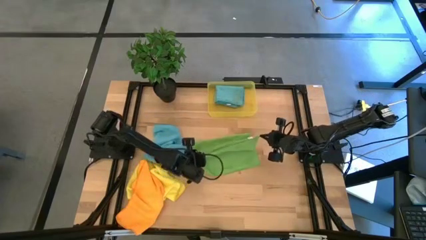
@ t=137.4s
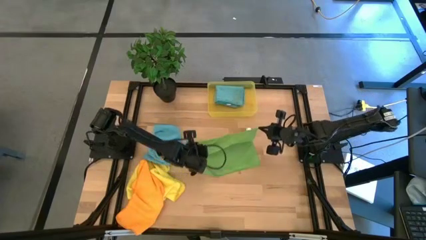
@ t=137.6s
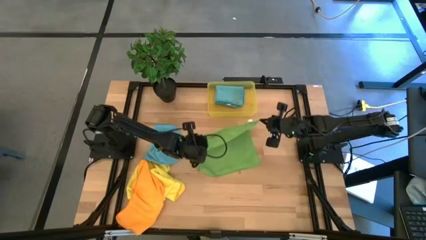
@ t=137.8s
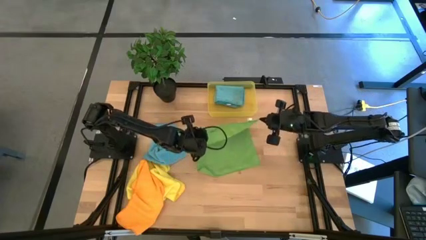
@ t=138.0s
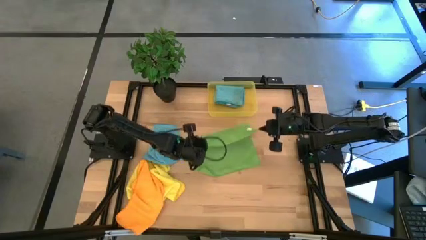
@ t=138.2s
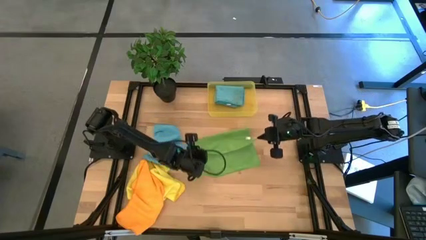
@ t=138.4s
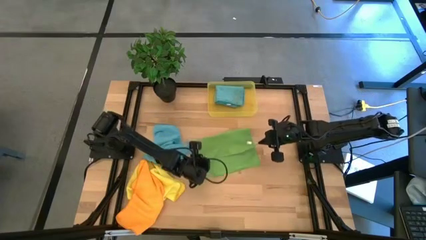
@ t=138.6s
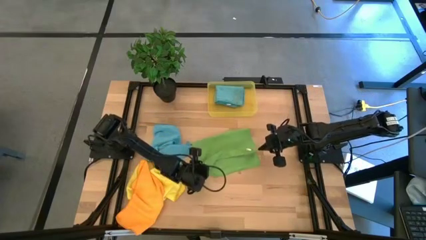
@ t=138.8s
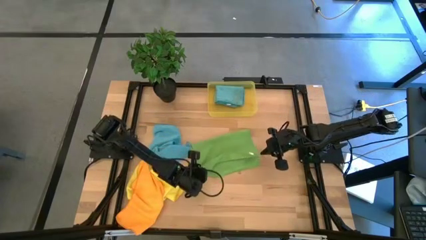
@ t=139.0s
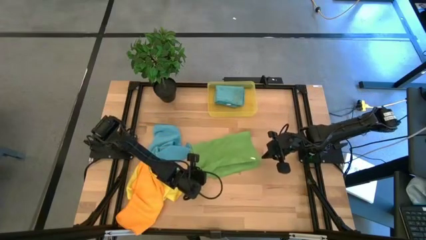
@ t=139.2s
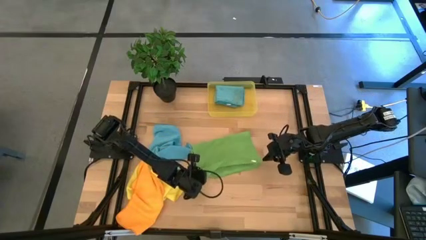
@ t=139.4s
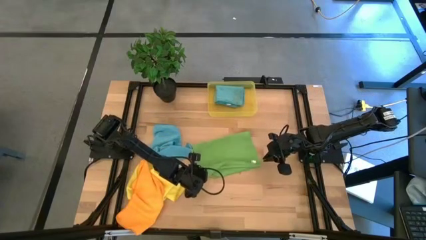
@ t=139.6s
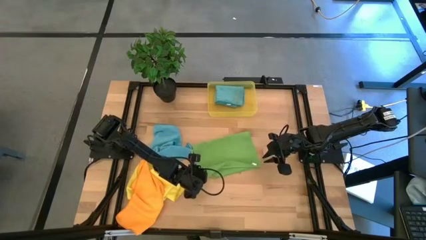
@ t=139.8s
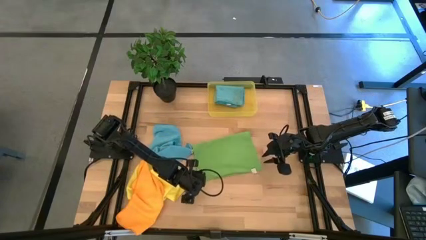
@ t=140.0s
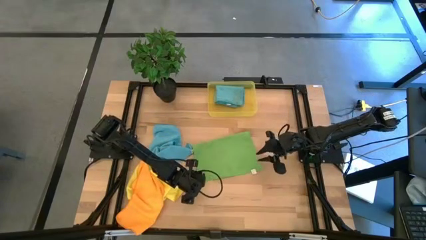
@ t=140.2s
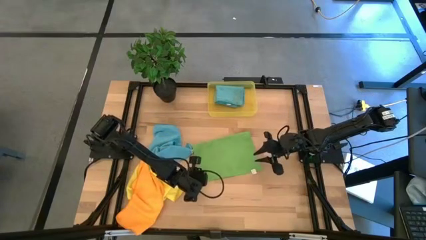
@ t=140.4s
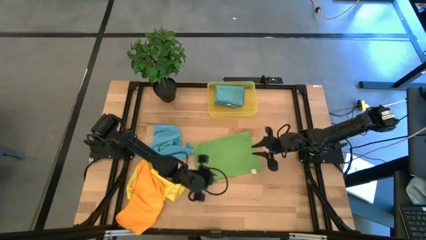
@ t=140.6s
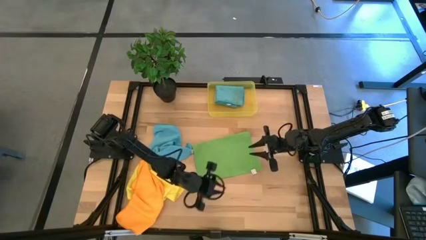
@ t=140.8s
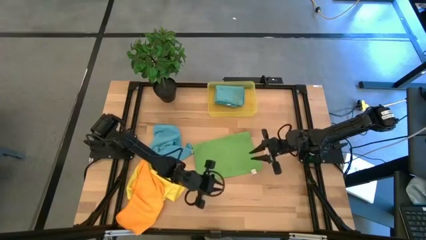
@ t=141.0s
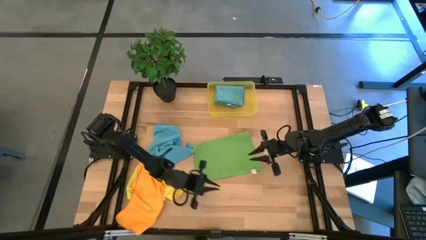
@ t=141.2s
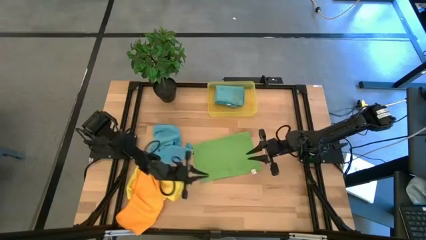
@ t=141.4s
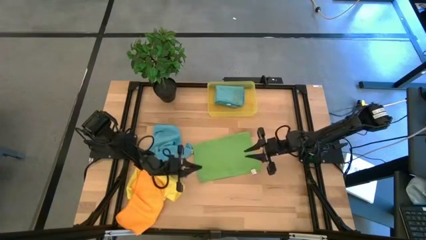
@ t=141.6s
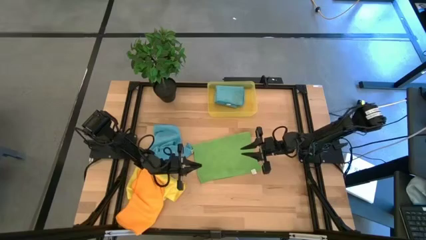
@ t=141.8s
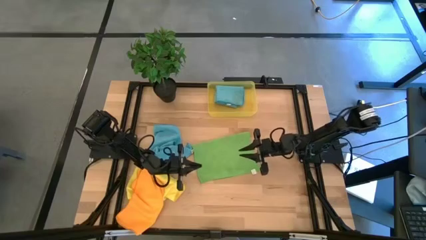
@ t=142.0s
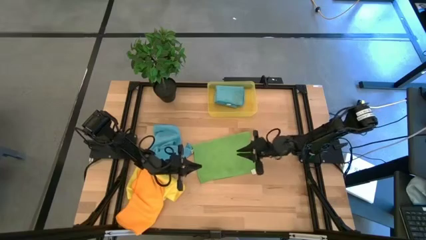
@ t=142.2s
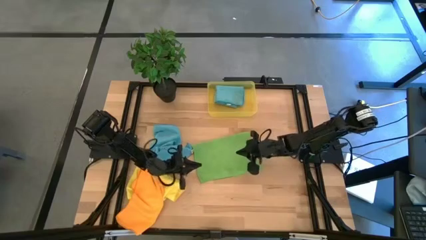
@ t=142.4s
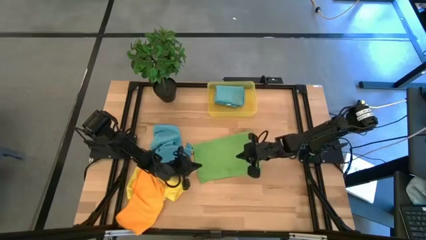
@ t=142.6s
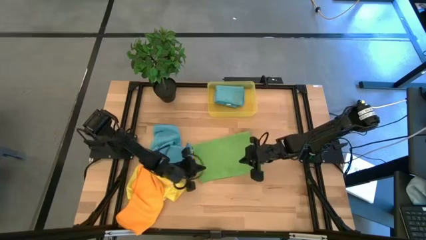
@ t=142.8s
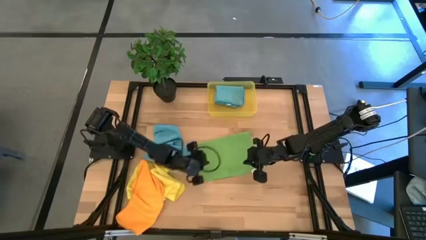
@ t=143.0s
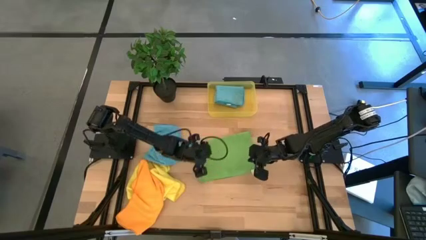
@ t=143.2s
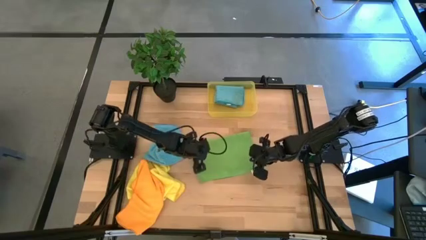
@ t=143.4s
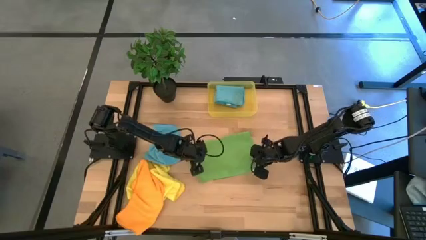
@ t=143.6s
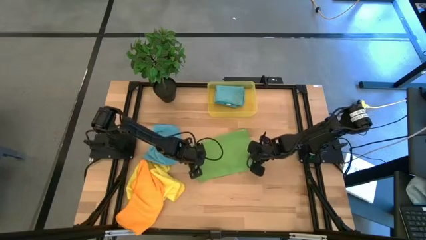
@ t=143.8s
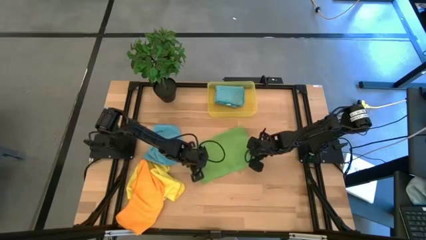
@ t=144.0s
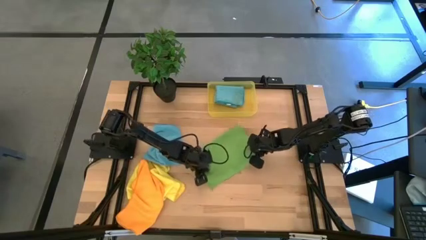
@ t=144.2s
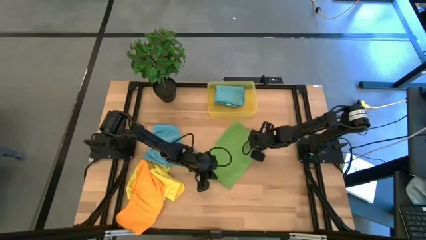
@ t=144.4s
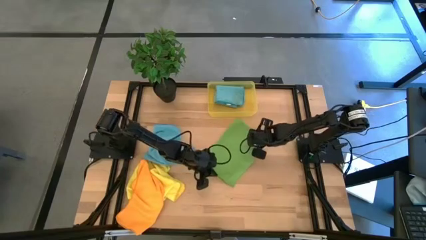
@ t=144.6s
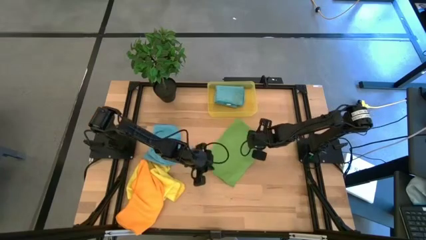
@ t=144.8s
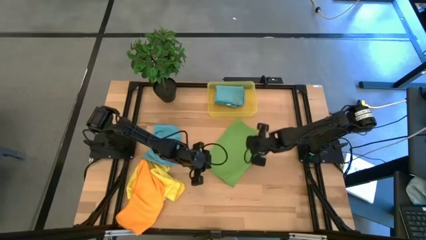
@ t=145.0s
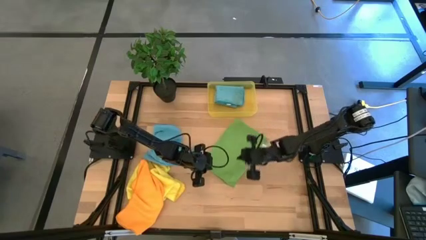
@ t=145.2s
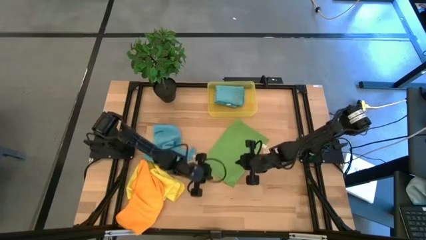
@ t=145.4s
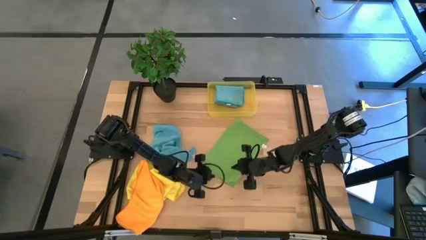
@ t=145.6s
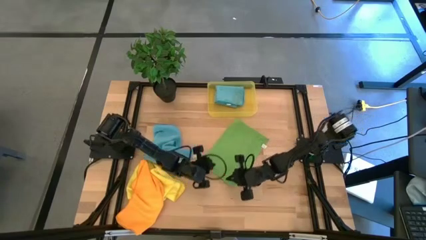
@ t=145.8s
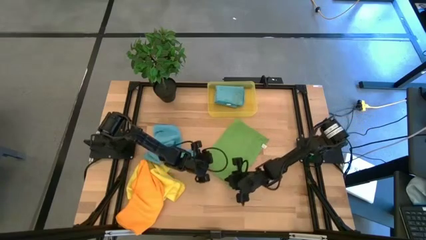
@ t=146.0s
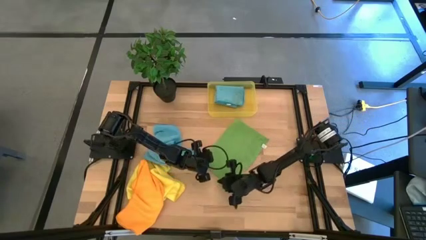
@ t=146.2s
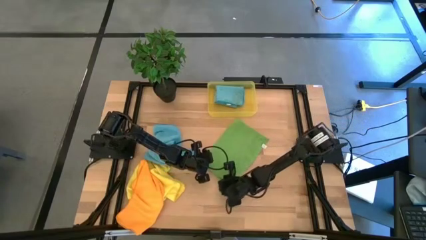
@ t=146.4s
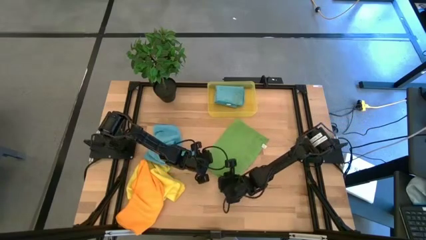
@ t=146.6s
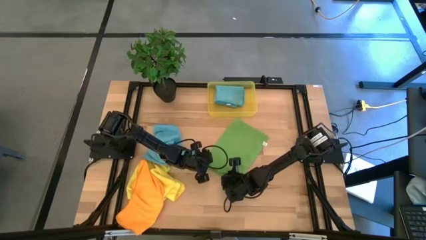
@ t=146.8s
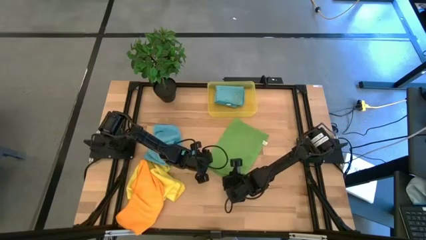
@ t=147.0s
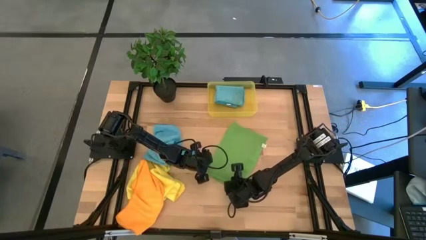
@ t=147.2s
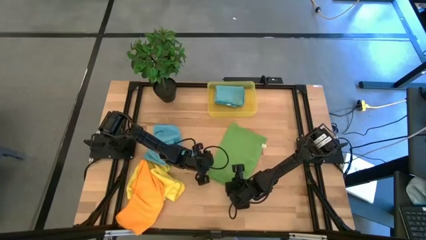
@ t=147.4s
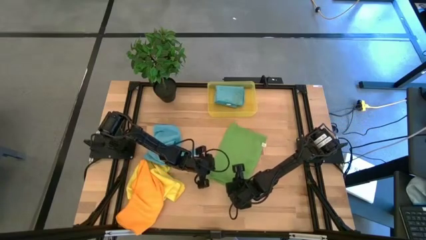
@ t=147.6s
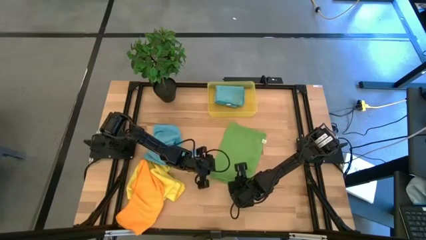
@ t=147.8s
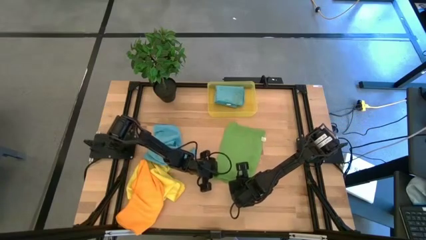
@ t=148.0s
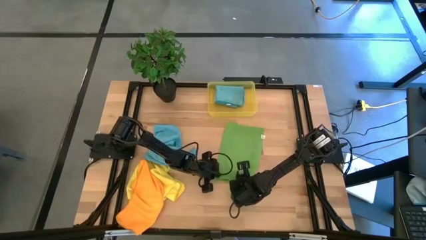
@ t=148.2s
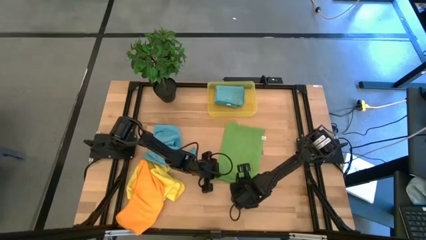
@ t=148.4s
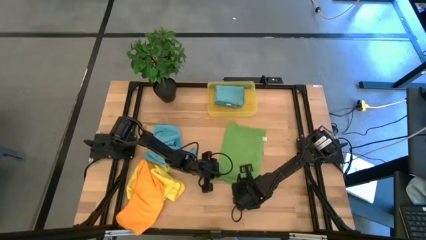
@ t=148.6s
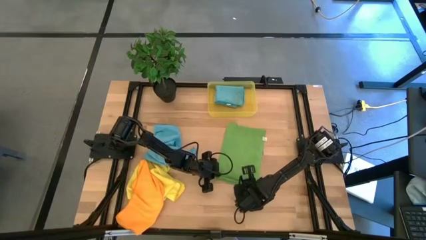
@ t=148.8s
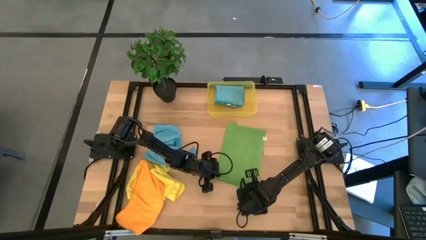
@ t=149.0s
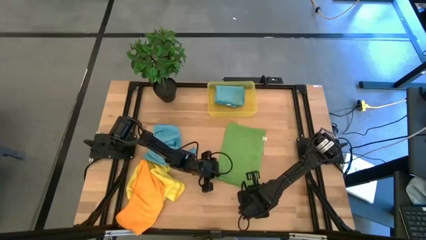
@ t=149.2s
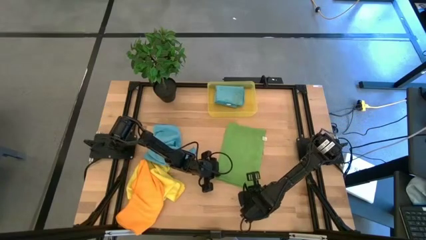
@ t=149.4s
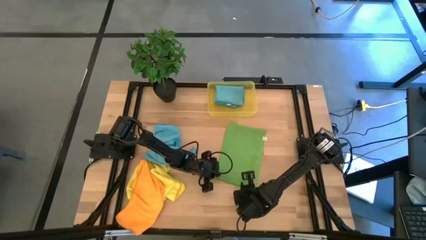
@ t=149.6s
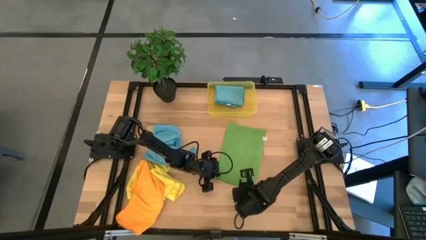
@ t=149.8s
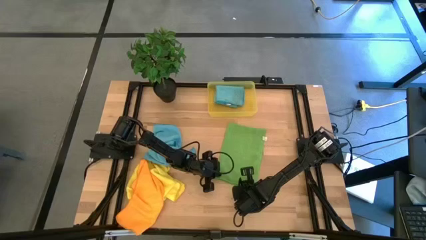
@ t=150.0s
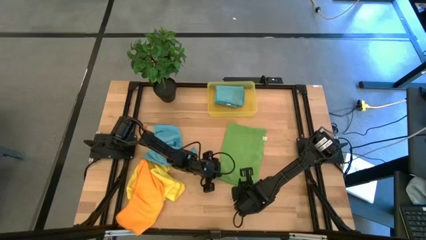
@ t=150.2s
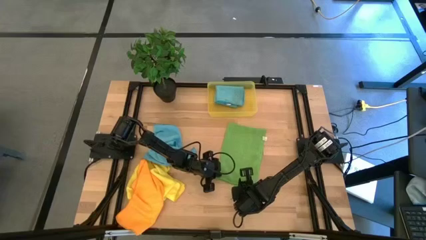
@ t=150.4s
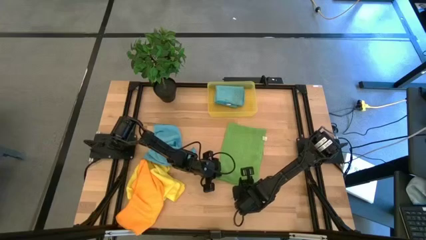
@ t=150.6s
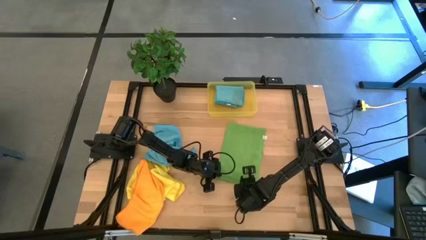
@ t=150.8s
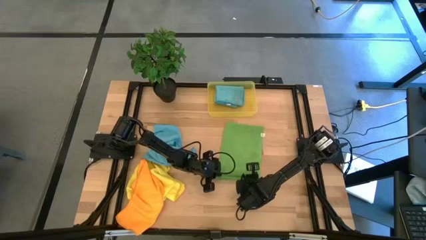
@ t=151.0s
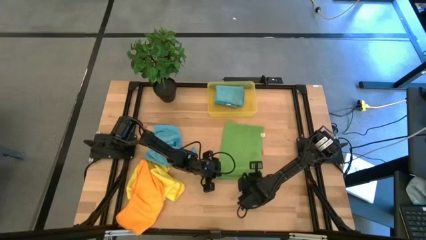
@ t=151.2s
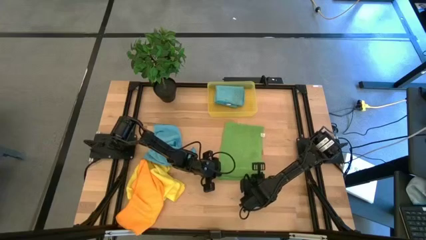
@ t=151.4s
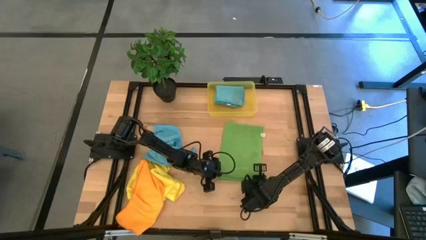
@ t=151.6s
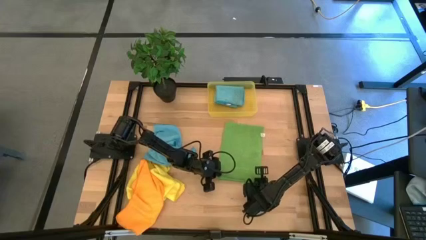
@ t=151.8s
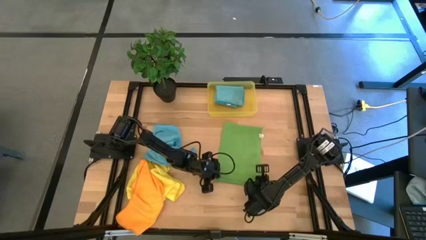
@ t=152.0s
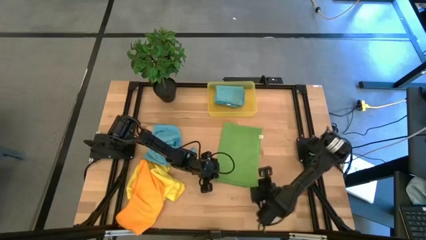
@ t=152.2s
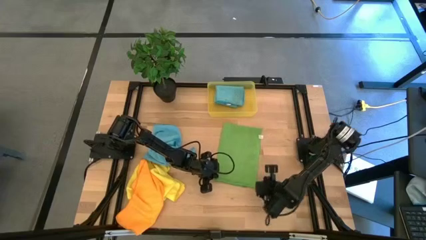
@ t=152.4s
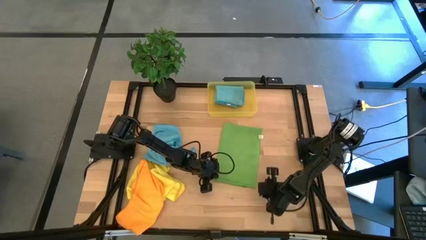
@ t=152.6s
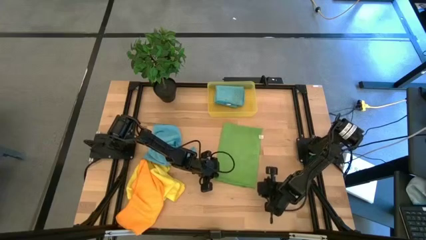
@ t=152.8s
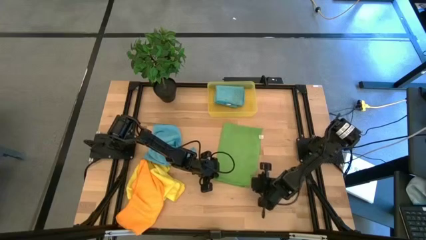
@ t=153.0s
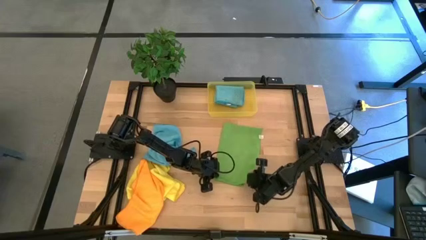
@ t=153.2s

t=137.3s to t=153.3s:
Task: Fold microfiber towels
Fold the green microfiber towel
